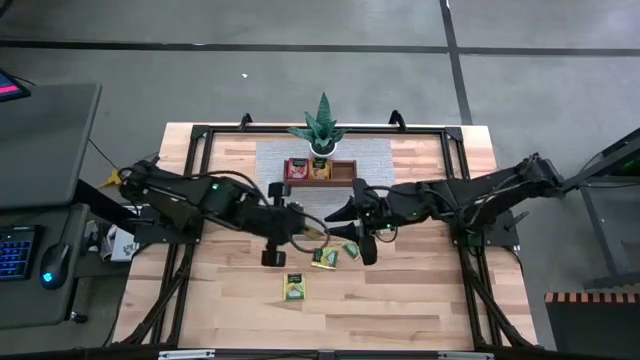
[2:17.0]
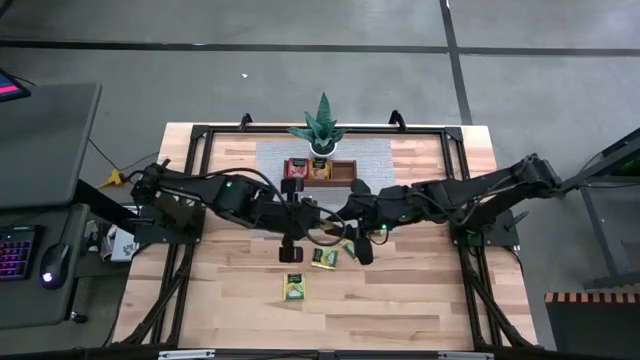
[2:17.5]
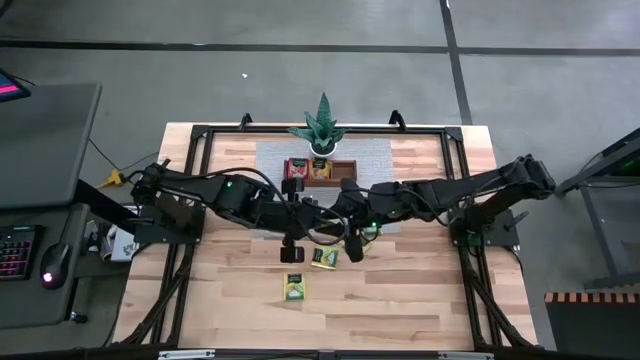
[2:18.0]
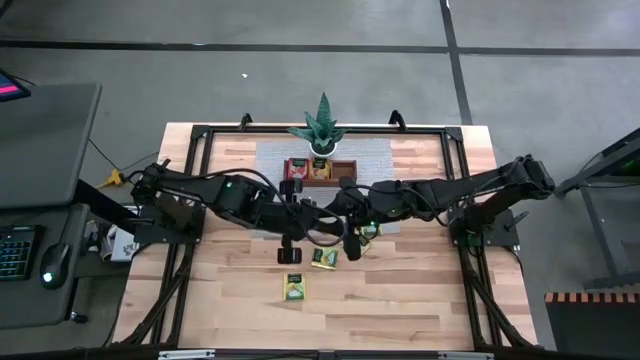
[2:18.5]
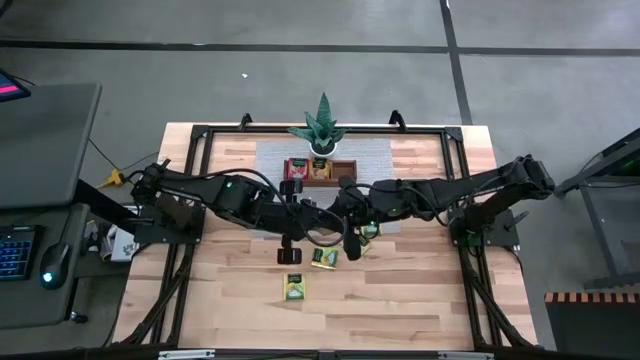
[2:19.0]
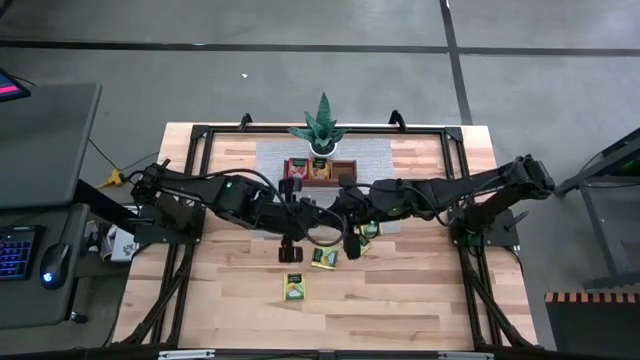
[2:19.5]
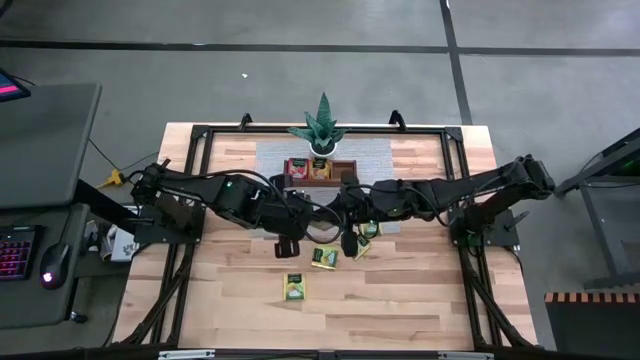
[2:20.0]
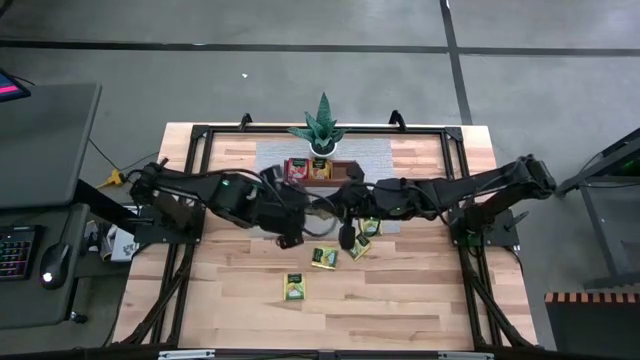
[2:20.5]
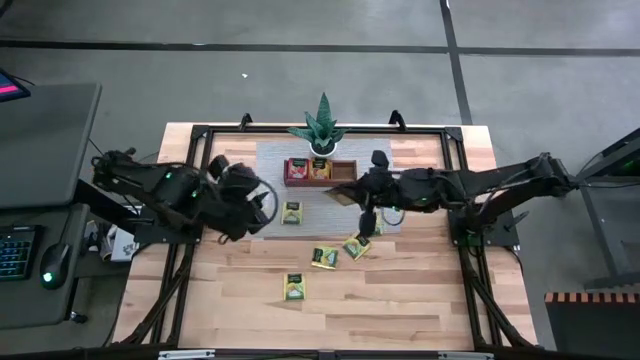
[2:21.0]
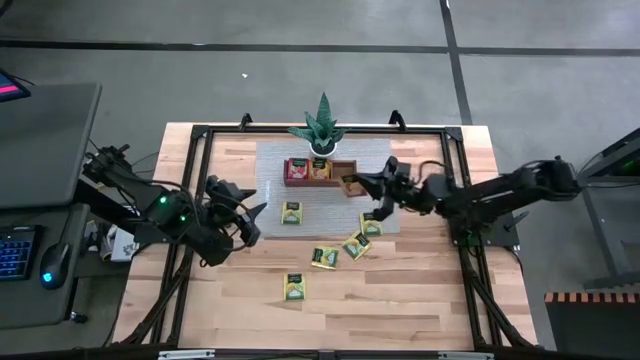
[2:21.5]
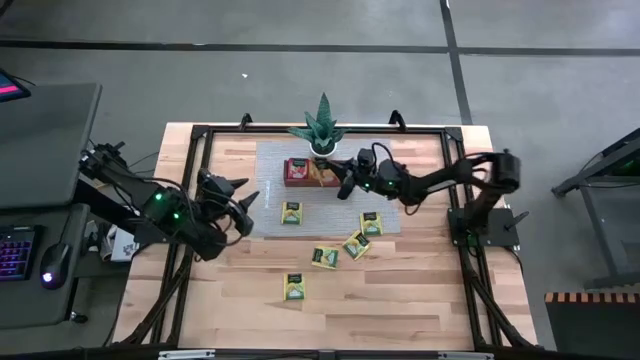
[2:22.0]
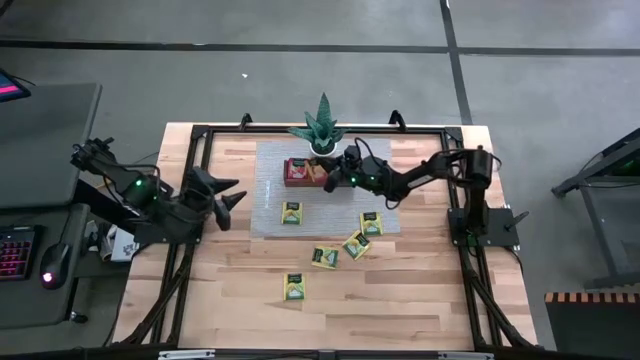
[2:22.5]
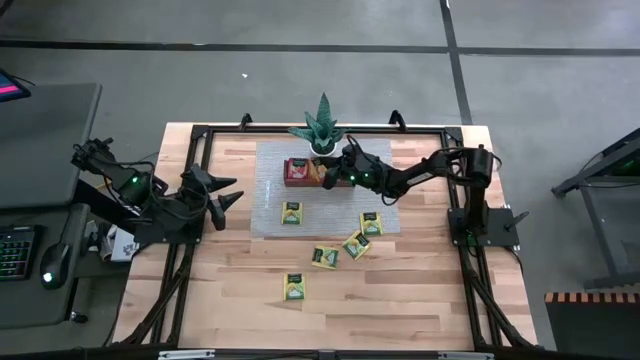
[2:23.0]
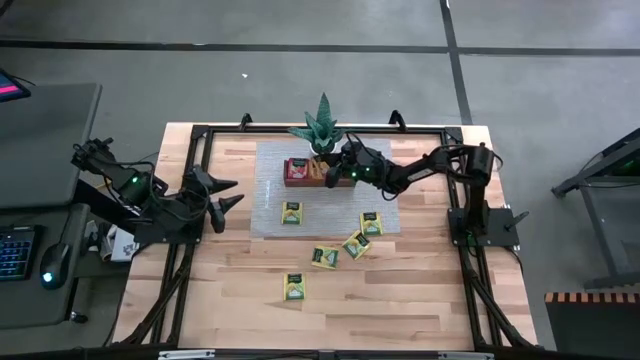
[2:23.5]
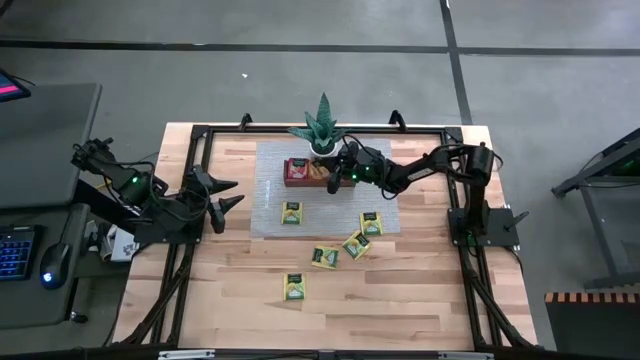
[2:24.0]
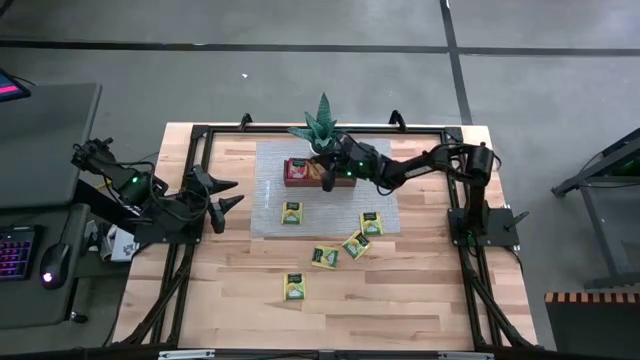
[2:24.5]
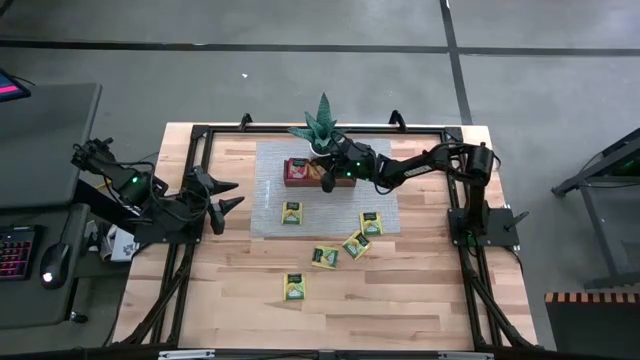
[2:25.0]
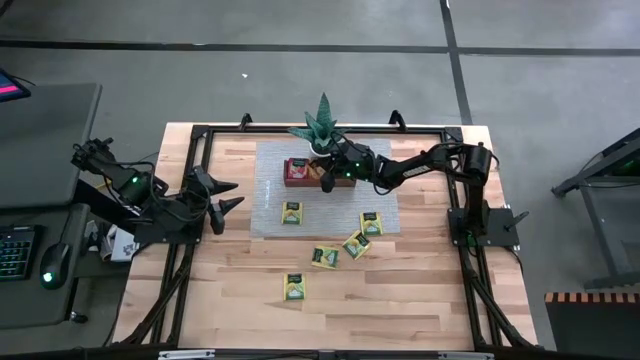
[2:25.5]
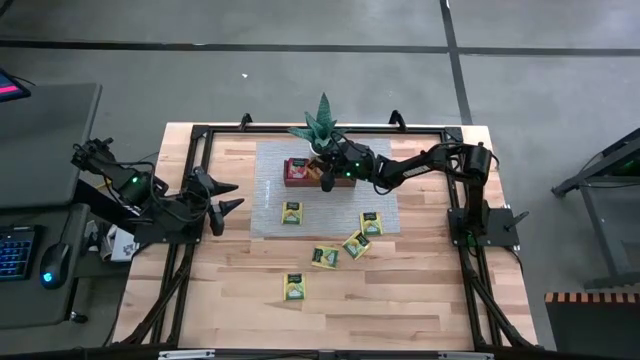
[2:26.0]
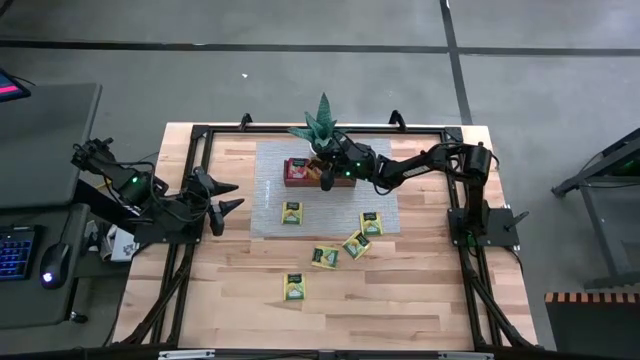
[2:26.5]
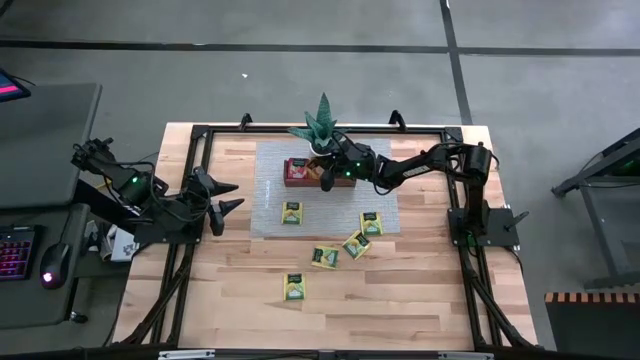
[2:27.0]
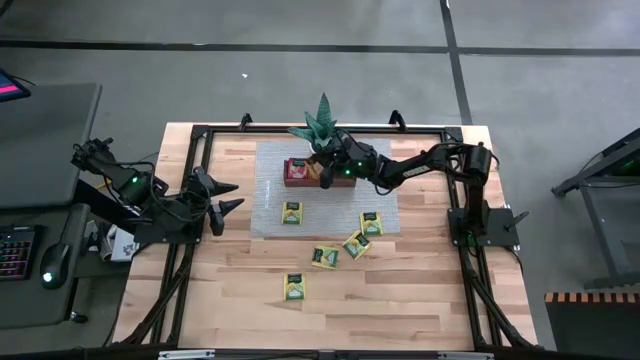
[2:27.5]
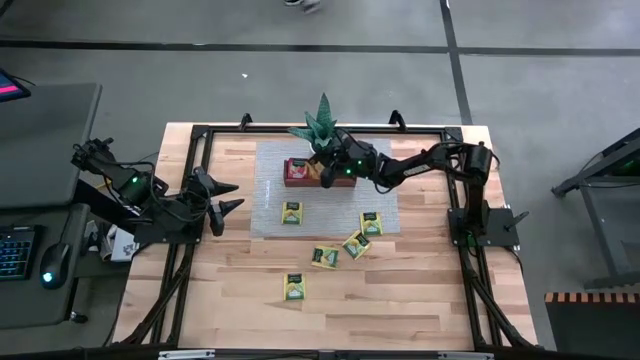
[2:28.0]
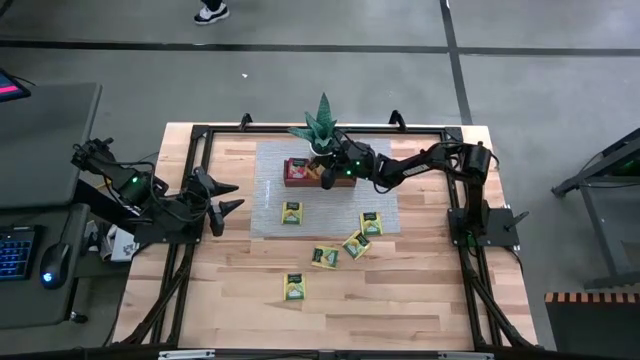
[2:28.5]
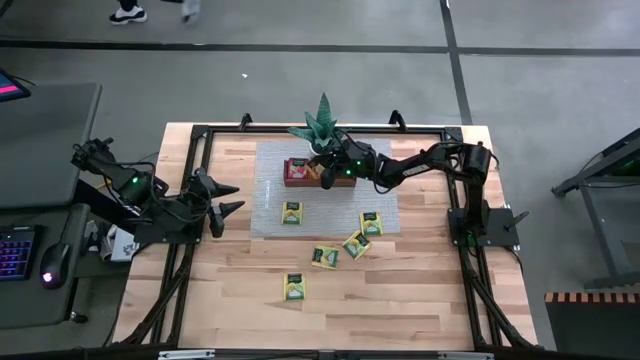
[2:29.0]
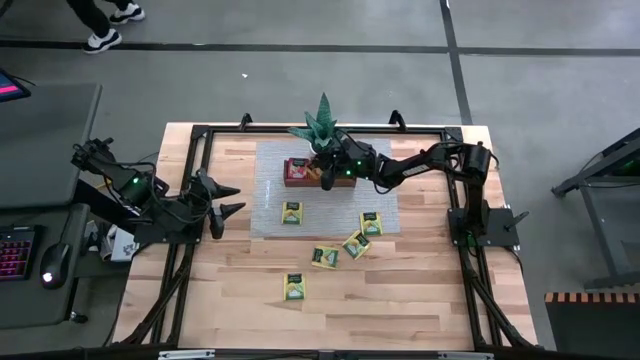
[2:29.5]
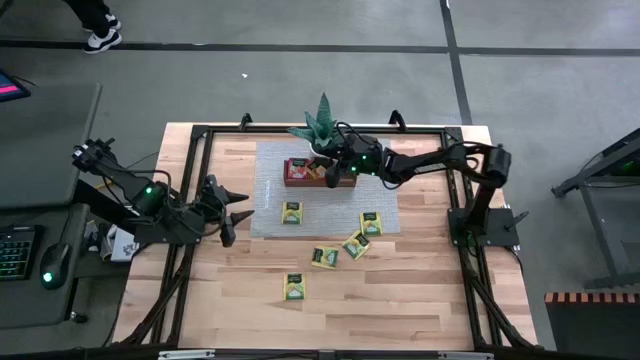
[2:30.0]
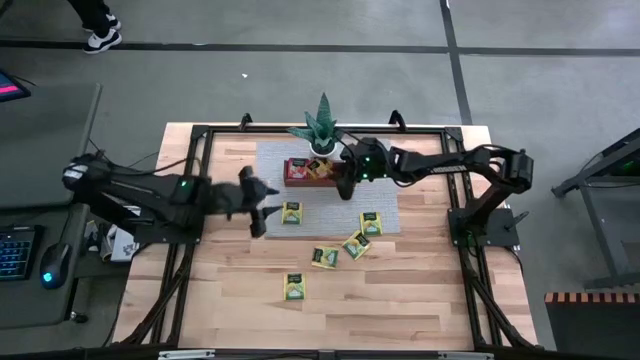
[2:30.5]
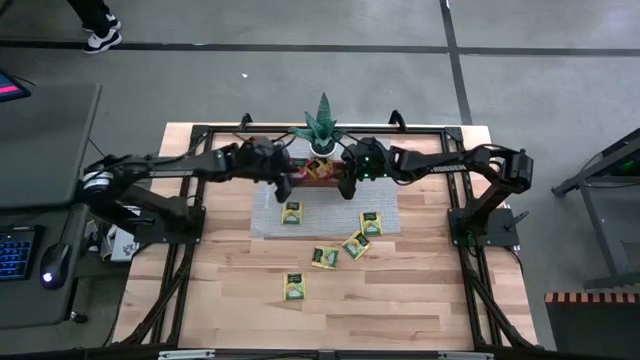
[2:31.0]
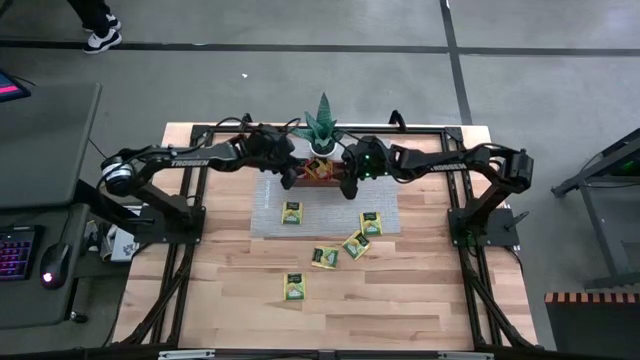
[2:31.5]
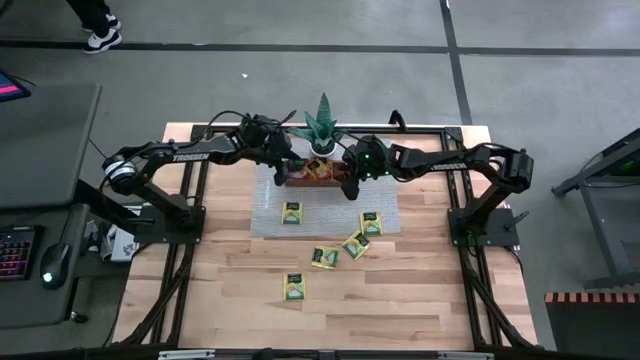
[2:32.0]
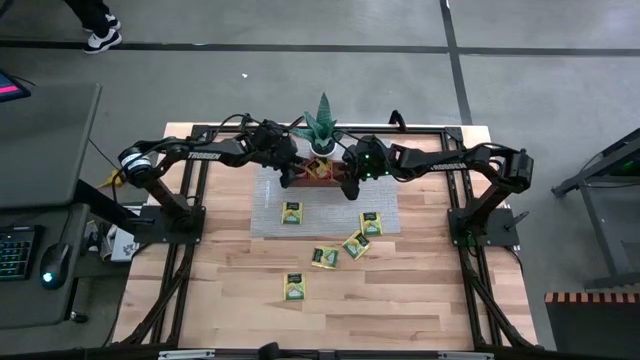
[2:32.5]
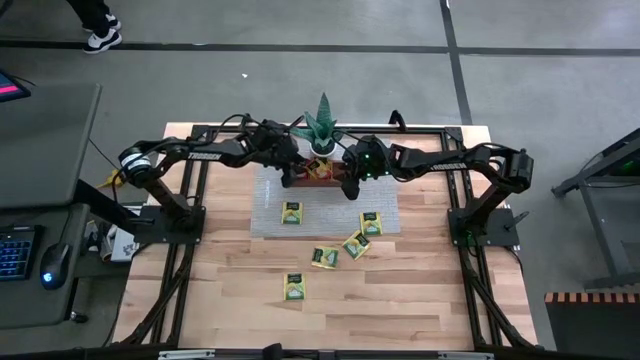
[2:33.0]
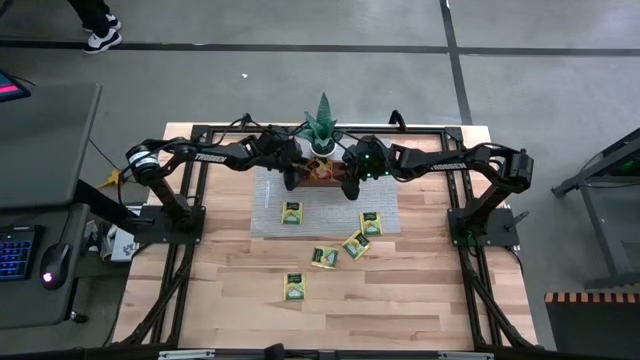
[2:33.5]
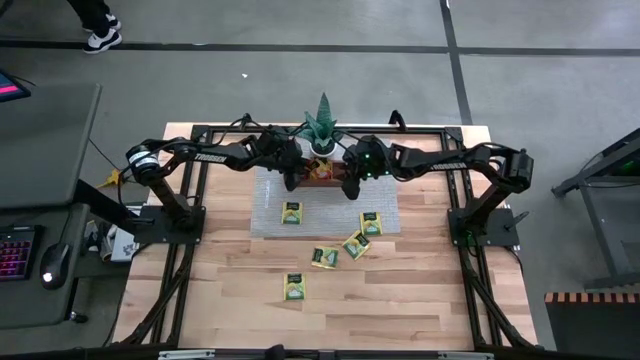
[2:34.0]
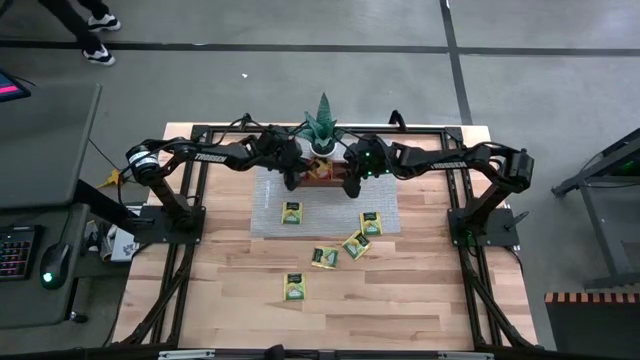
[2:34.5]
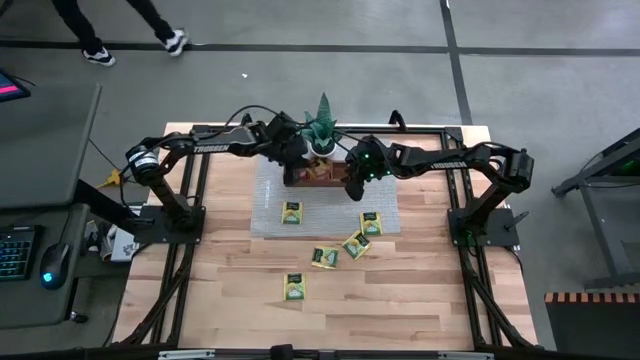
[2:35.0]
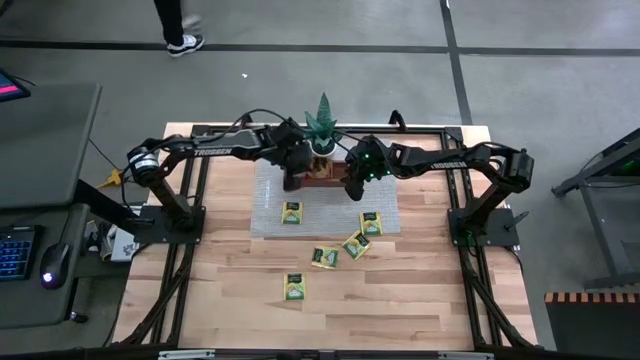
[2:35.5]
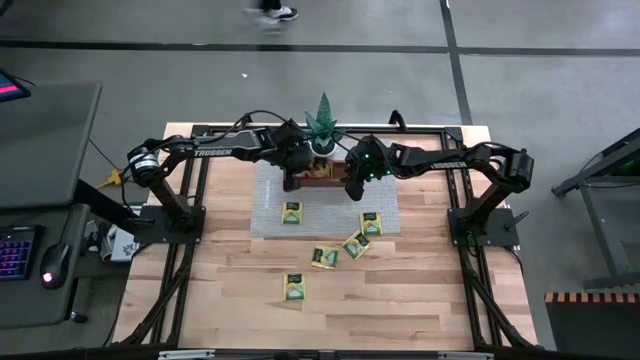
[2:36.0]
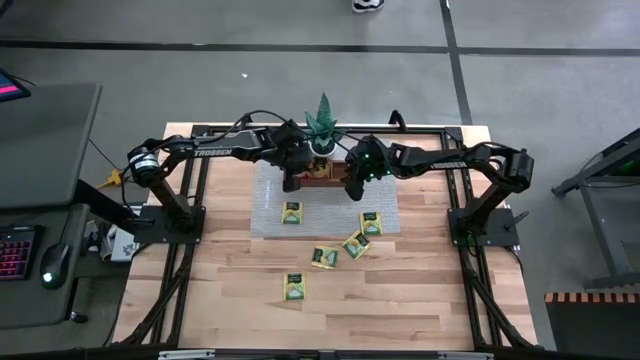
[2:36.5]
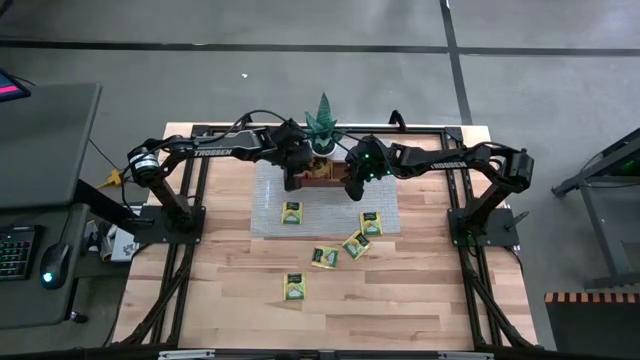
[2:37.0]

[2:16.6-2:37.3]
Task: Pick & Place Tea
Put the orange tea bag into the middle section of the wooden organizer

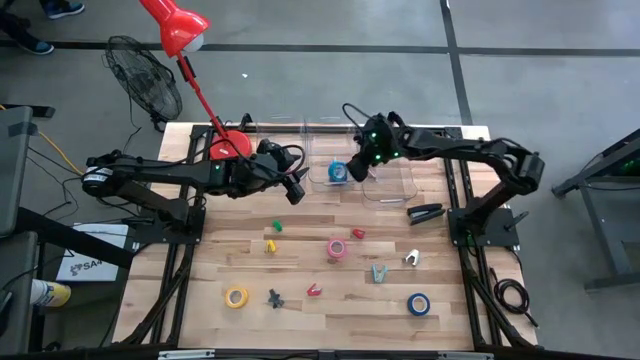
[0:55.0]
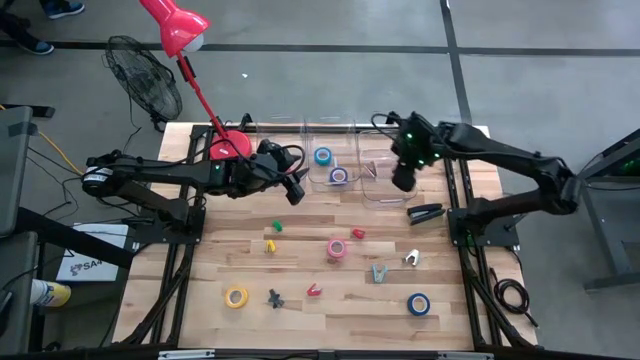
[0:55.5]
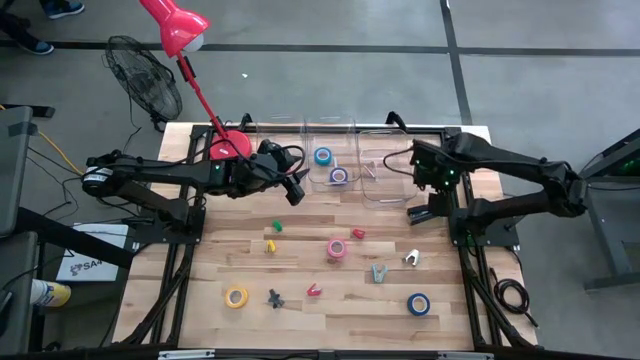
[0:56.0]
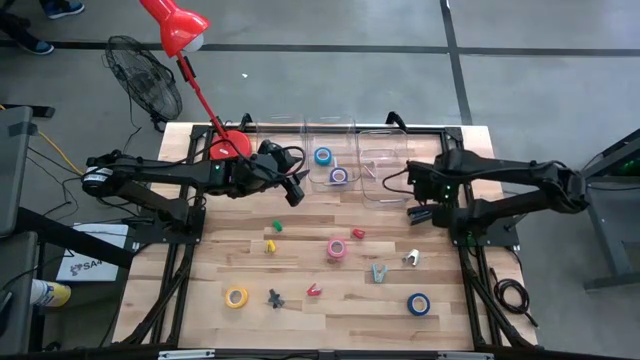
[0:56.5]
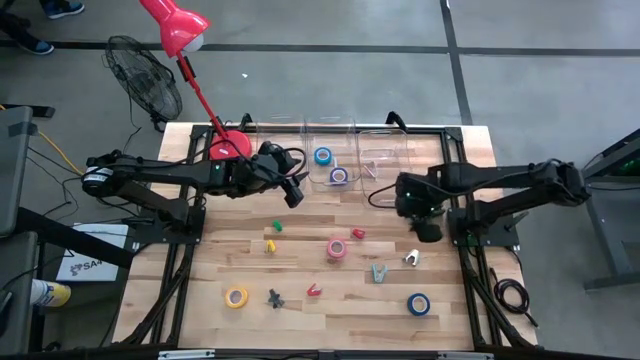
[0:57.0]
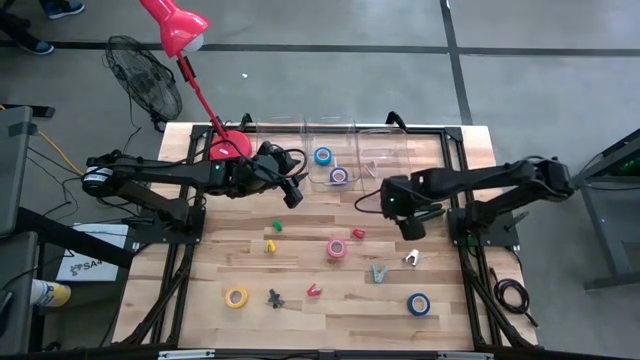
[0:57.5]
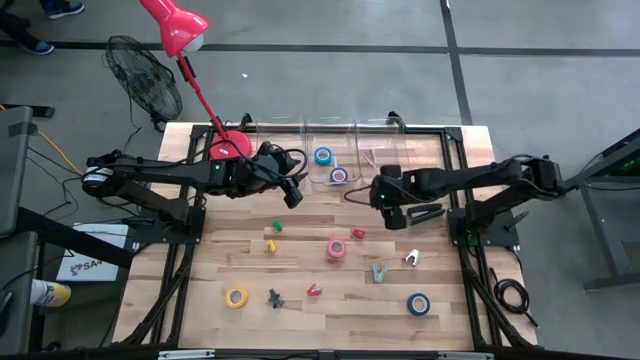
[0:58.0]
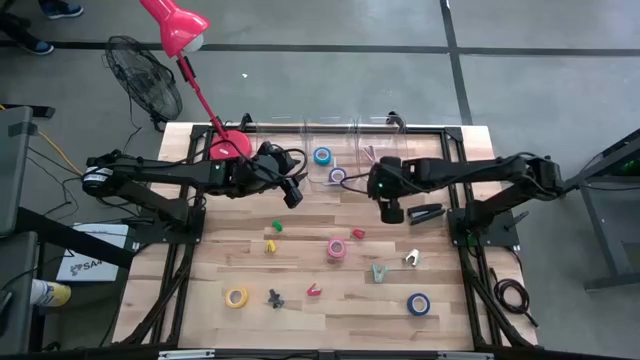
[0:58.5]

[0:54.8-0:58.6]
Task: Pick and place Stapler, Stapler remover, tape
Adjust the right transparent bin
